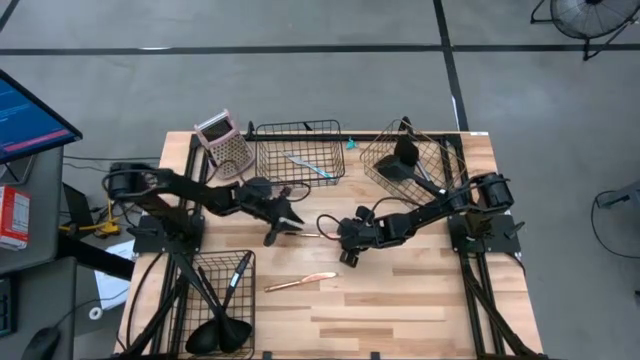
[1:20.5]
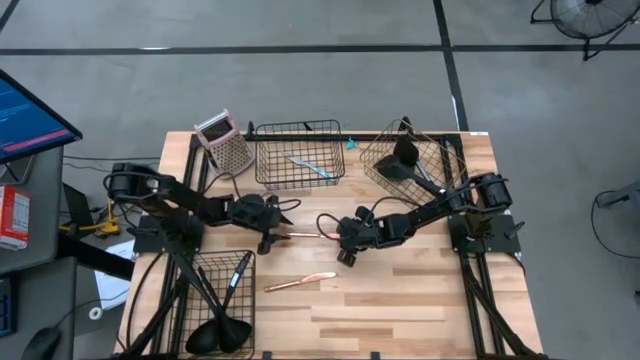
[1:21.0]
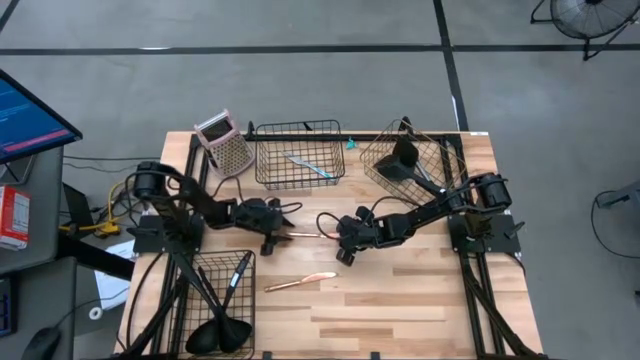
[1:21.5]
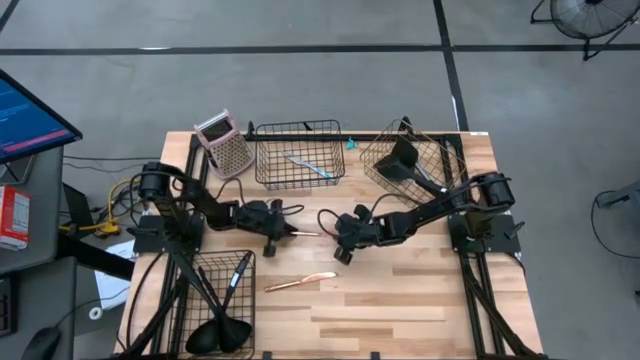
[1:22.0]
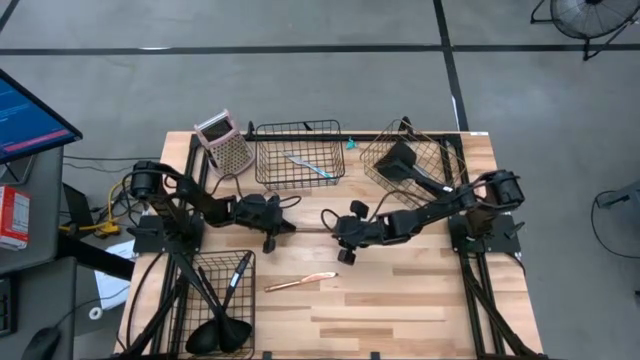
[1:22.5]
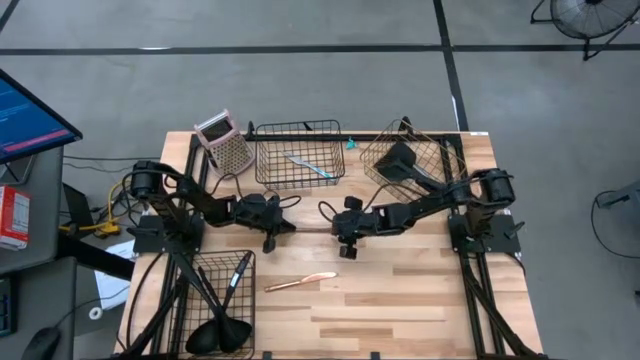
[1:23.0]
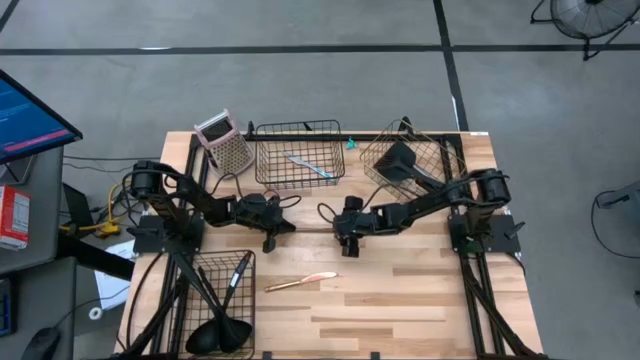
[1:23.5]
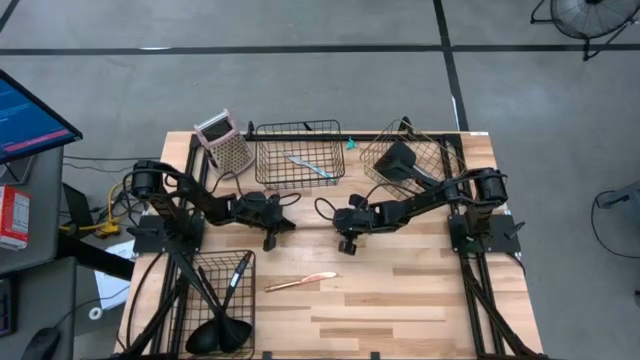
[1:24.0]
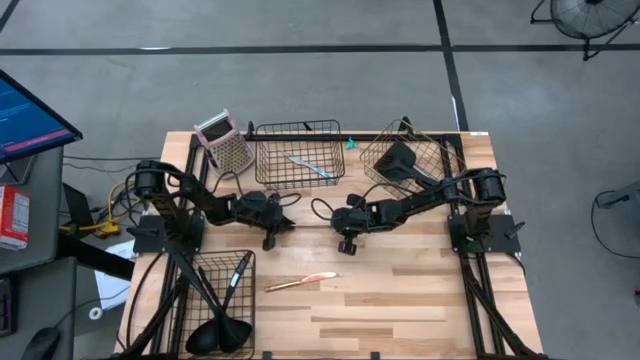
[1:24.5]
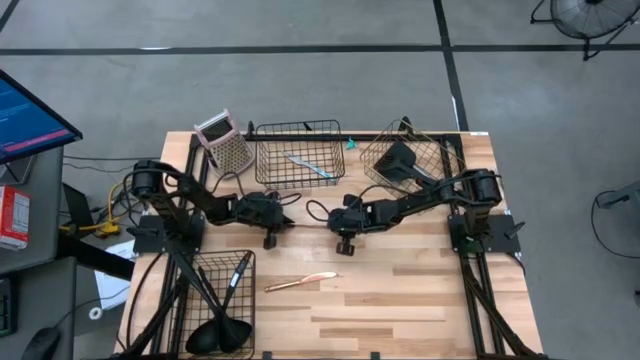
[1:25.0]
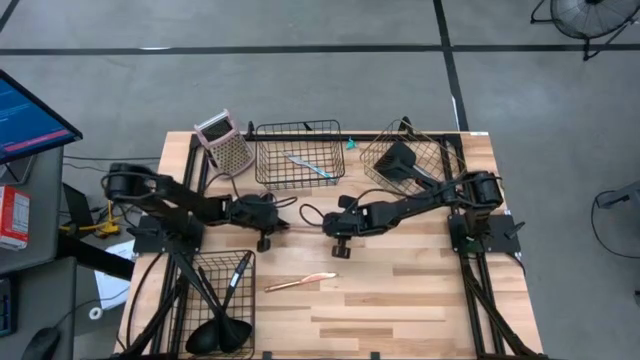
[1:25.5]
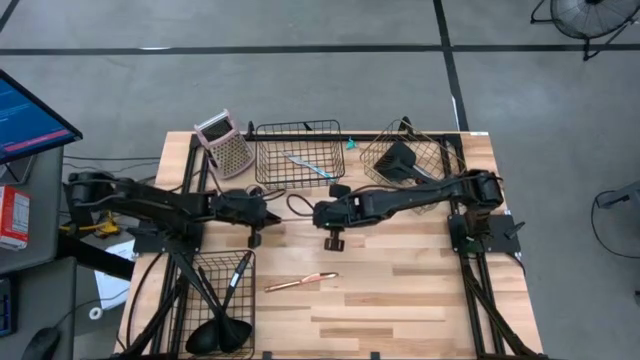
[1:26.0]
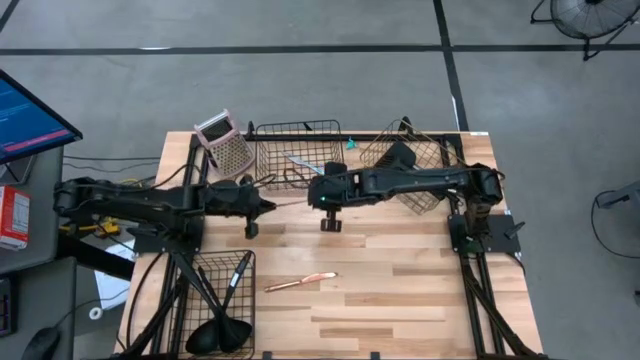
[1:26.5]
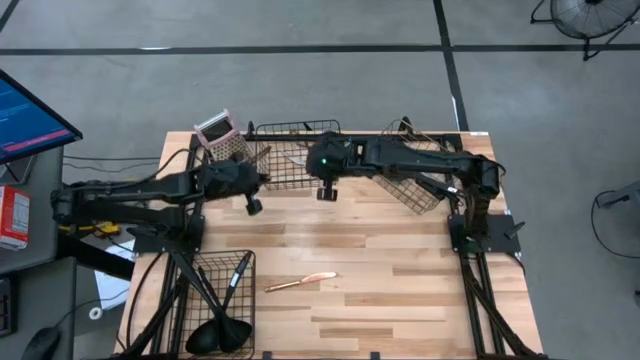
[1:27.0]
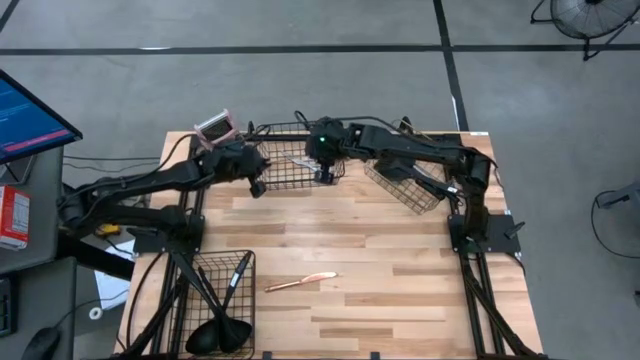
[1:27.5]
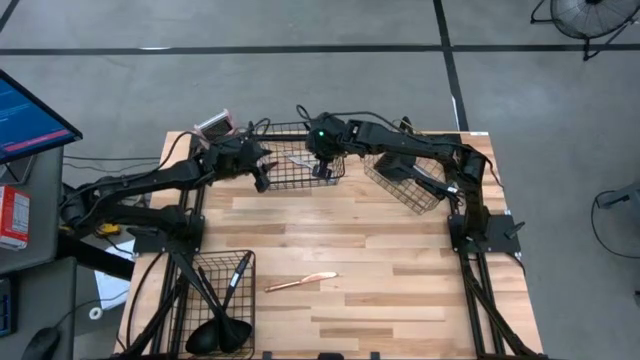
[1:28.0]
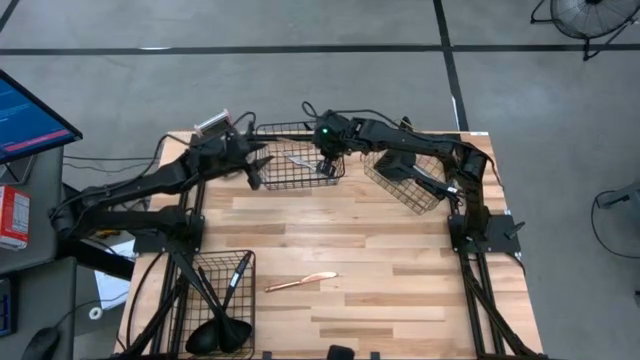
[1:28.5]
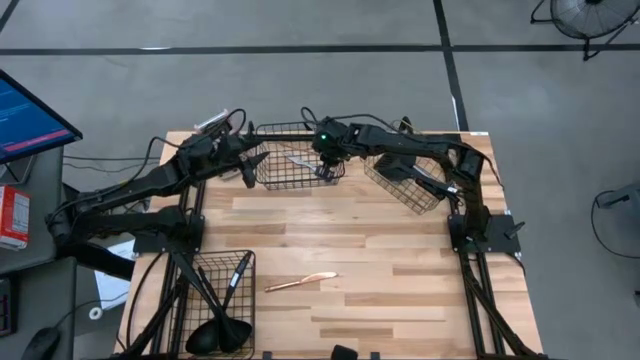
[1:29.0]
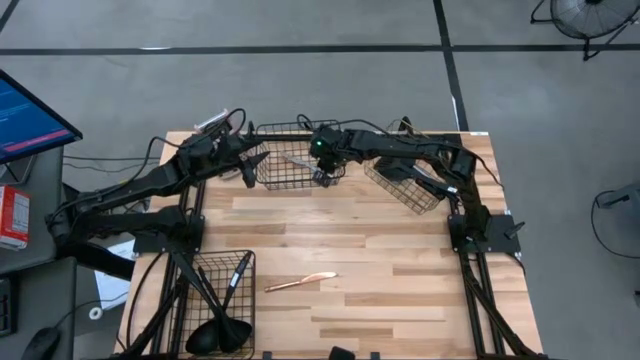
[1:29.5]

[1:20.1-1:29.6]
Task: Pick & Place Kitchen Items
Put the brown knife into the top black wire basket

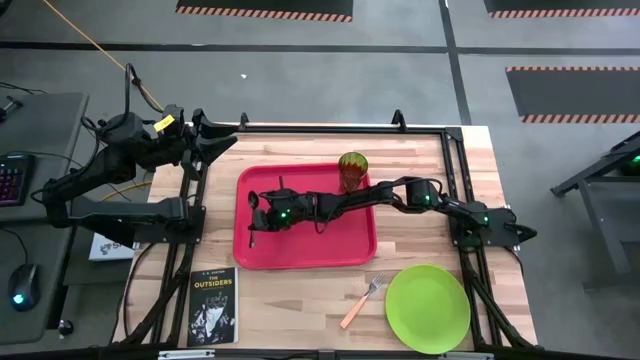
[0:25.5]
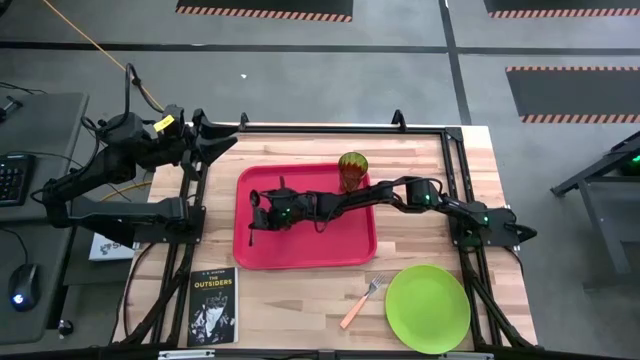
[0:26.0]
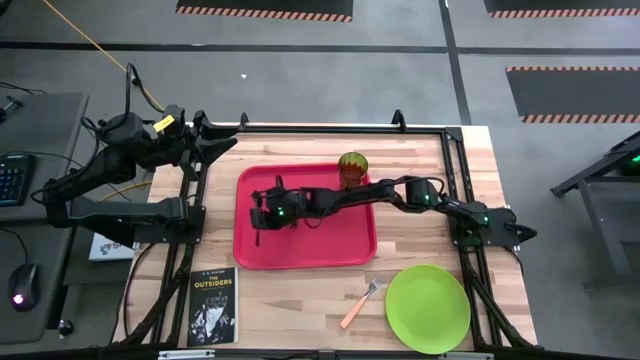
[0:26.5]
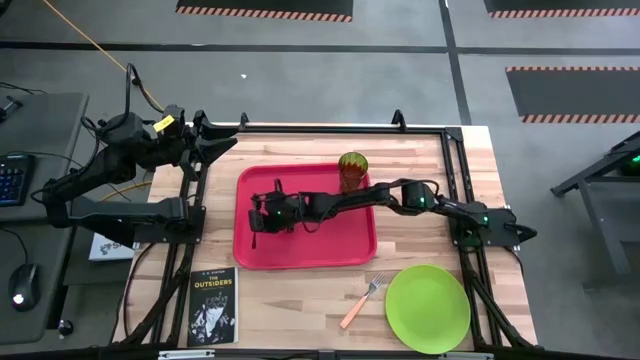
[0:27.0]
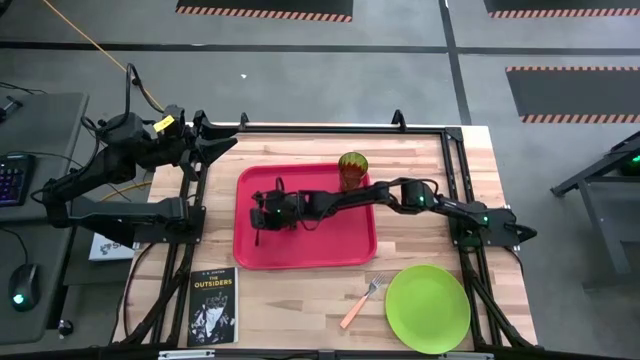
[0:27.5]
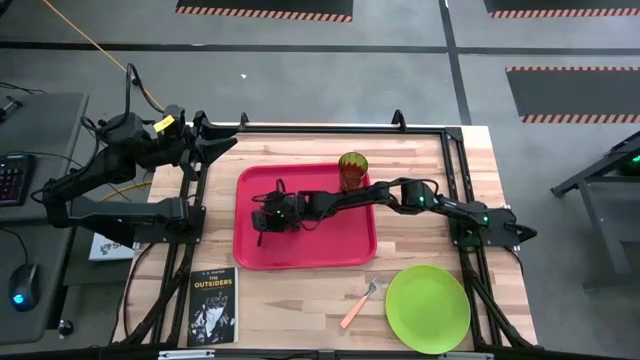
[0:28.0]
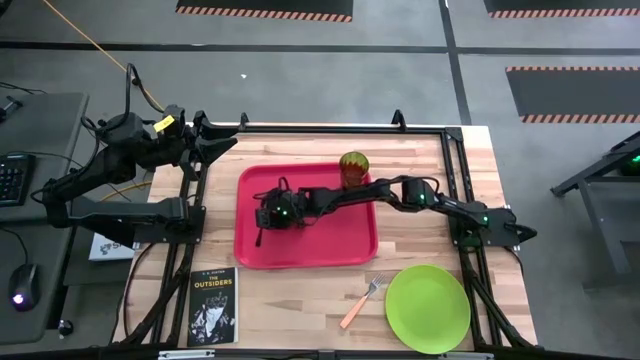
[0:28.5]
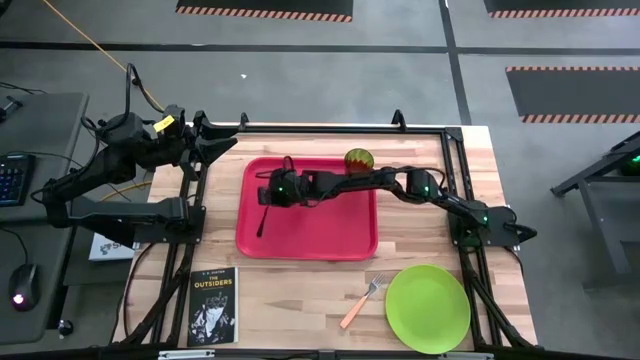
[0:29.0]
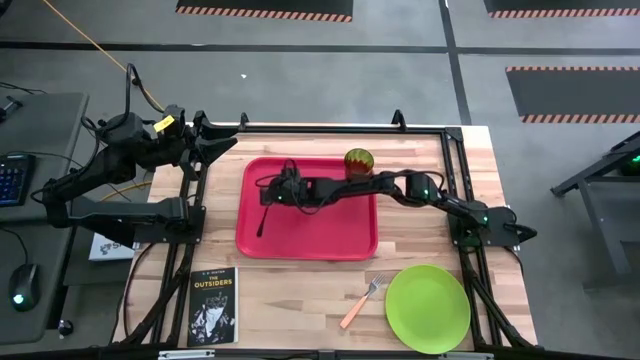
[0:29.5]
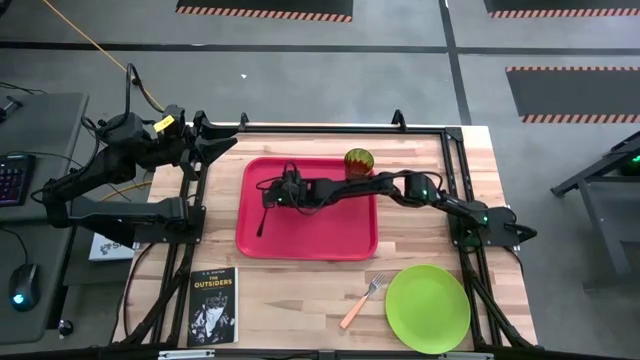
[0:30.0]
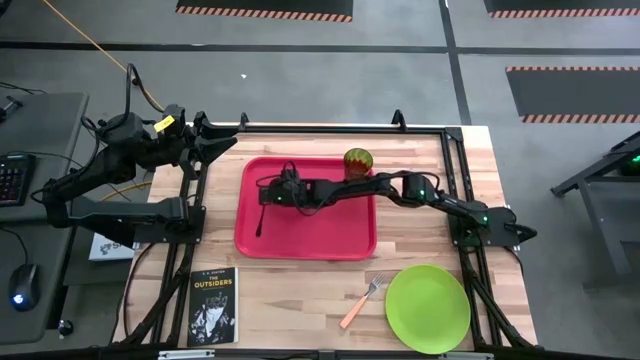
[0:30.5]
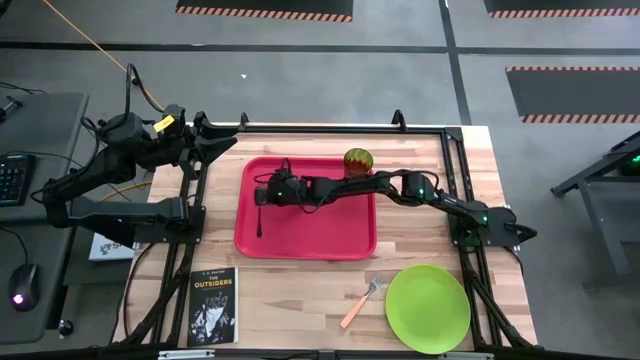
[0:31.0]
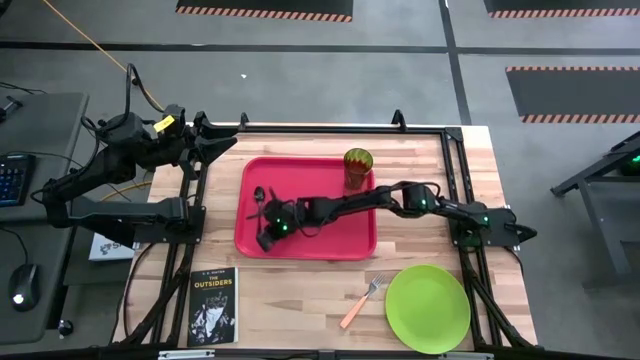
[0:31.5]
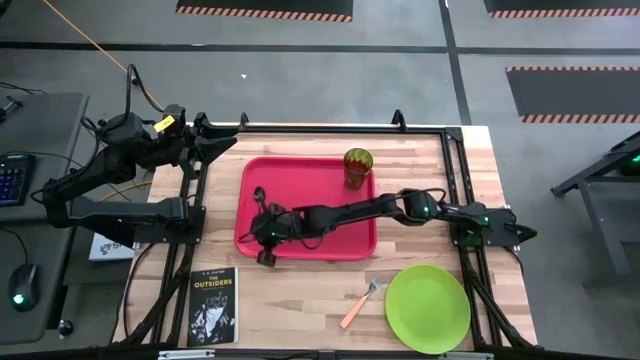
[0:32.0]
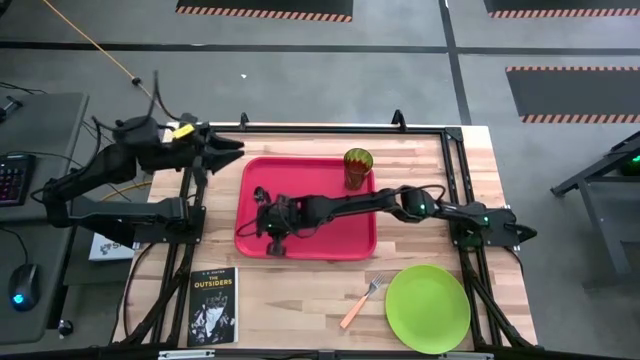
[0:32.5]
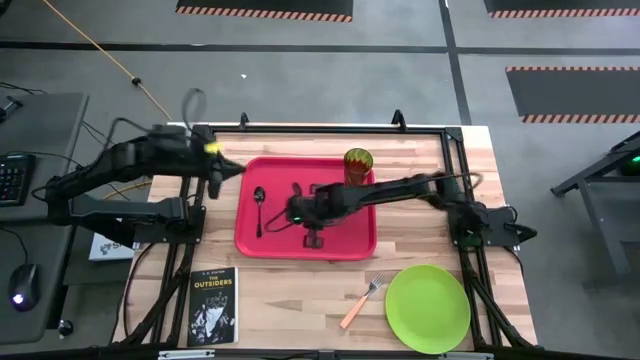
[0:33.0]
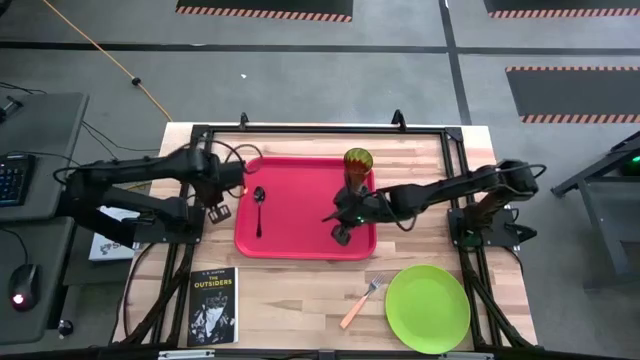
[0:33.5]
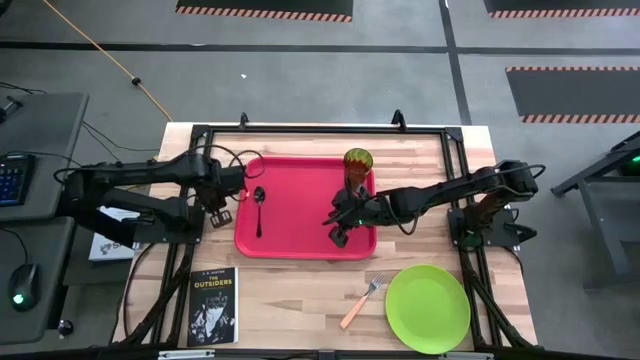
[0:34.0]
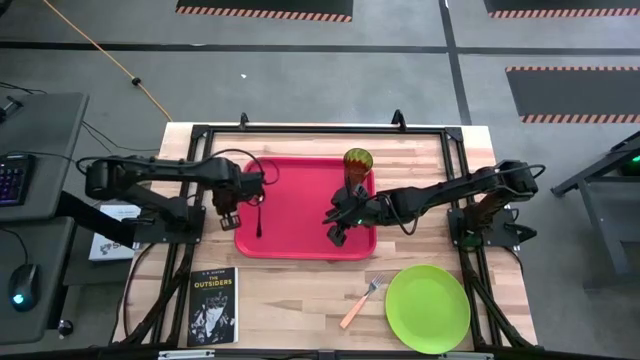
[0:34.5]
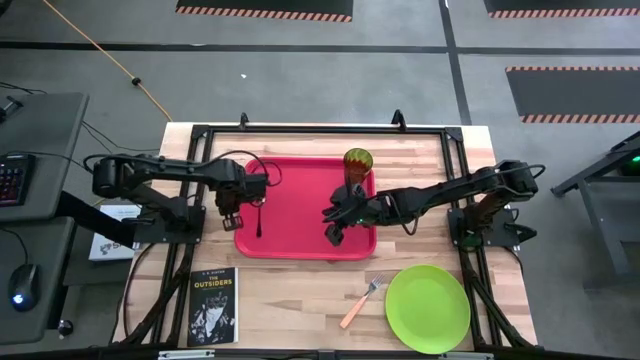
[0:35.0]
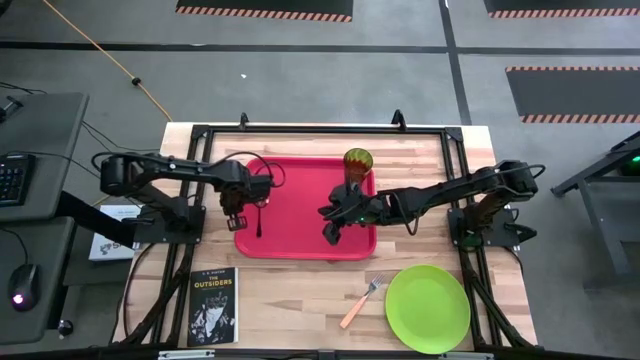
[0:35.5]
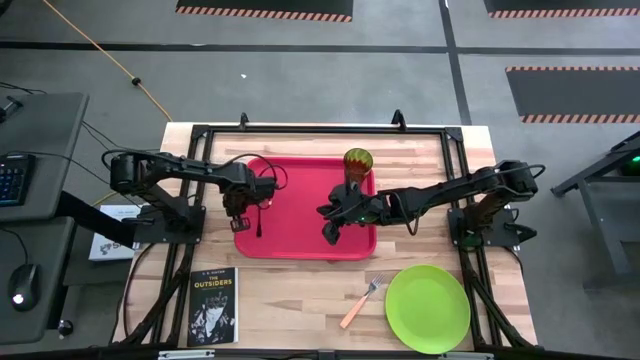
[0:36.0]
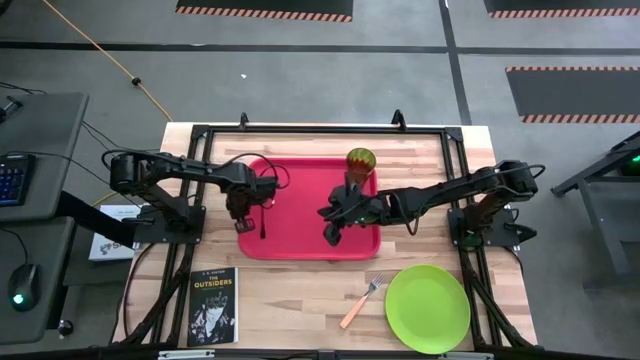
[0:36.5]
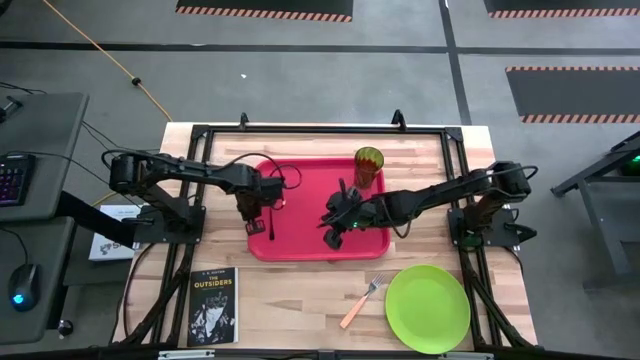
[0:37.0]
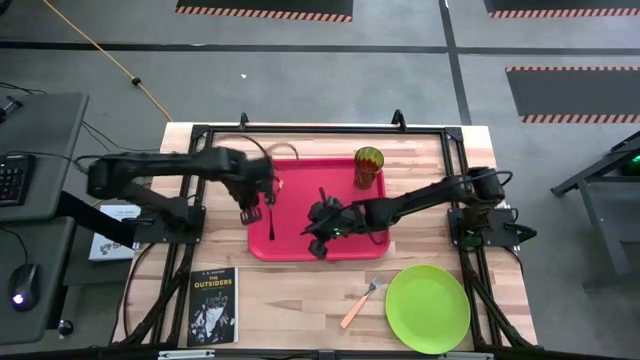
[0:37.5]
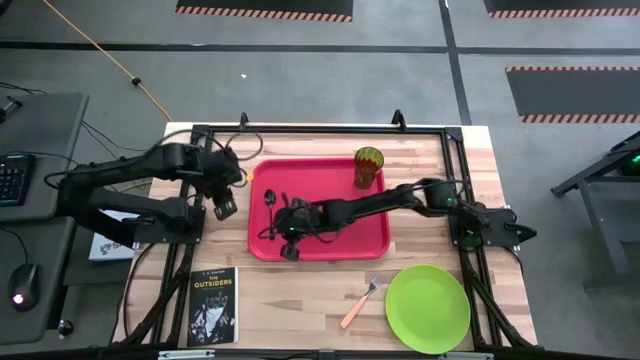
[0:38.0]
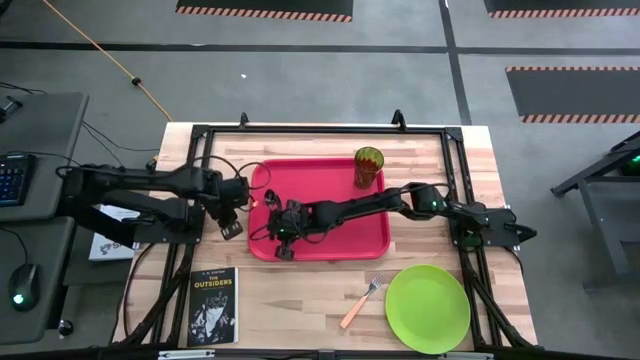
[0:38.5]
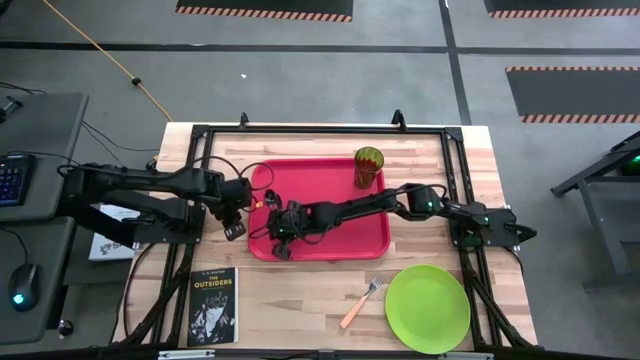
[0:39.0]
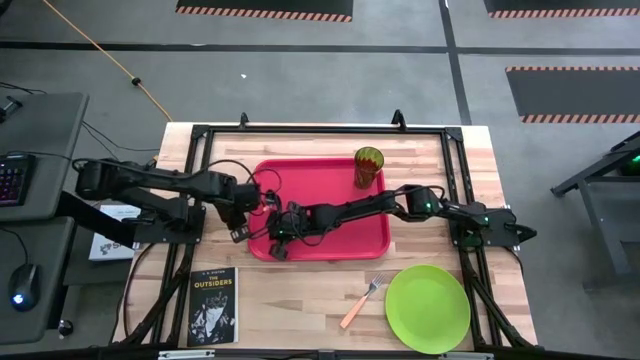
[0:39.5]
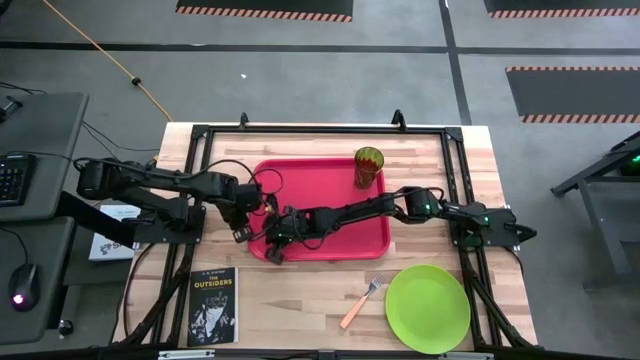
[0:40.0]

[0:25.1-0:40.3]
Task: Pick and place plate/cup/fork/spoon on tray
Put the black spoon to the left side of the red tray
